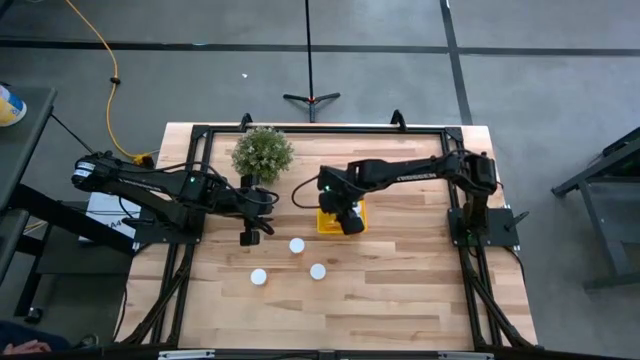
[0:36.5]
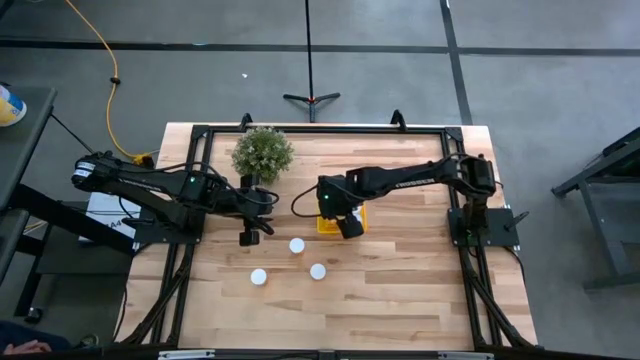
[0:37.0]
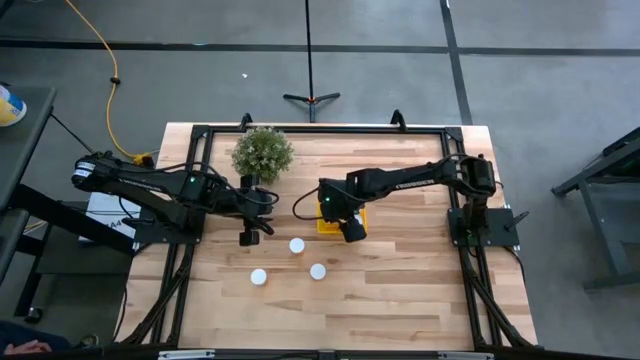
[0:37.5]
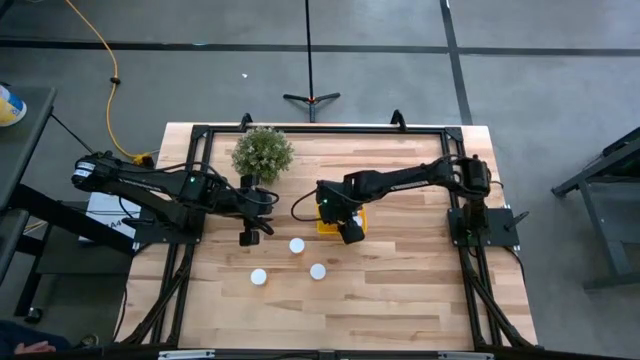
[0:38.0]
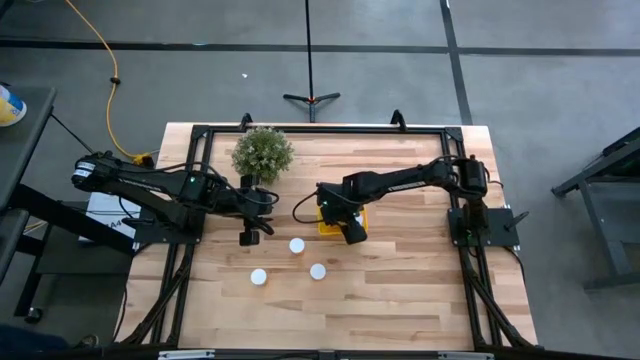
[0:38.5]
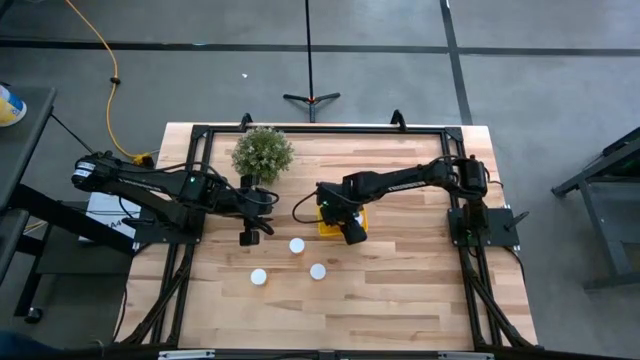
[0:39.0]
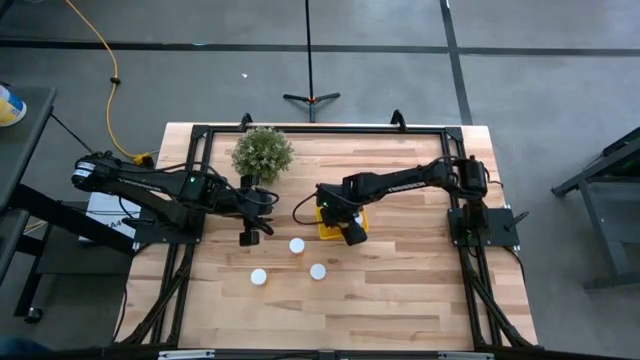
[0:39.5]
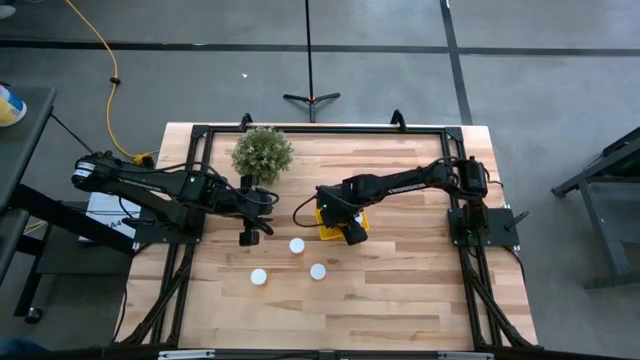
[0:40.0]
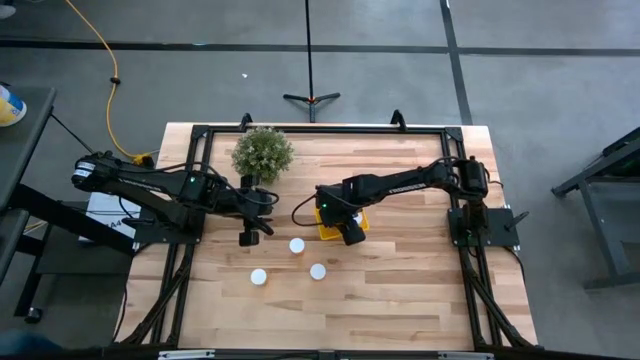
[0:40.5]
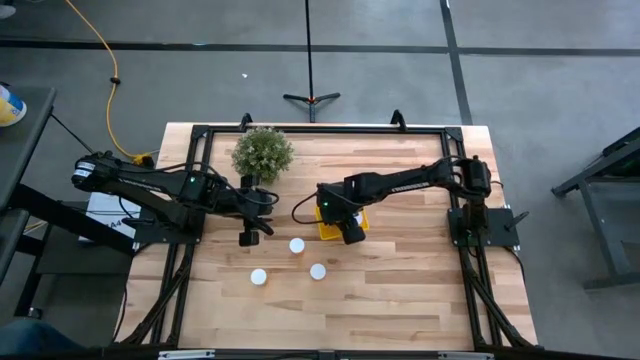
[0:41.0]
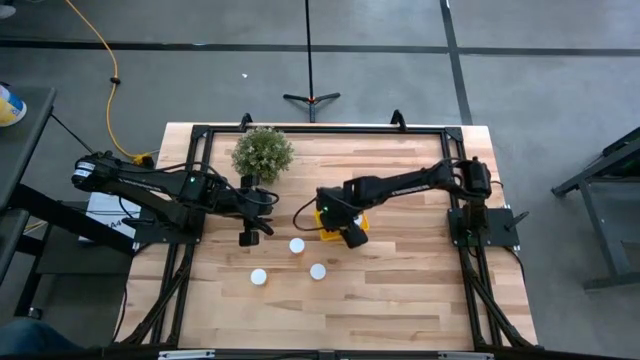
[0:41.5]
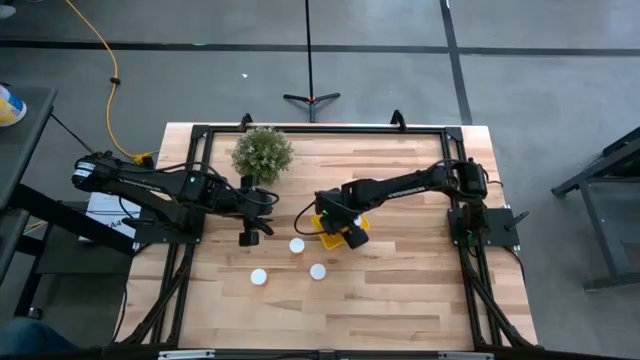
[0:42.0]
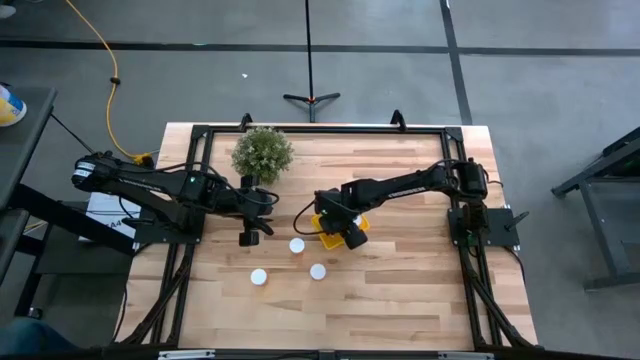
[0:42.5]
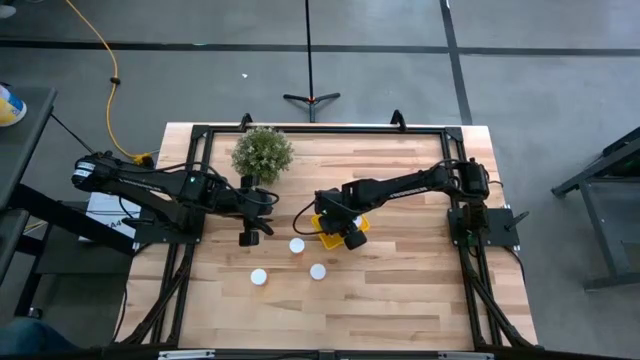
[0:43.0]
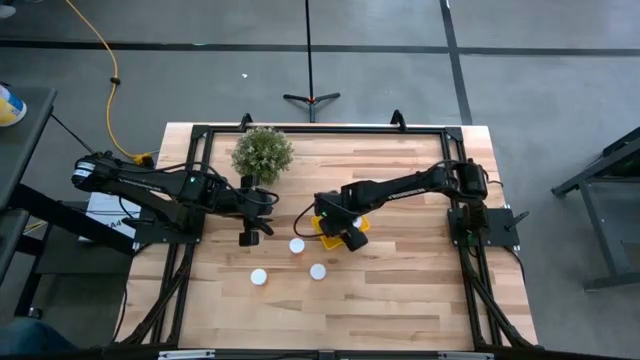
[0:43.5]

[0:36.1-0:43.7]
Task: Pick and place pill bottles into a basket
Adjust the orange pill bottles

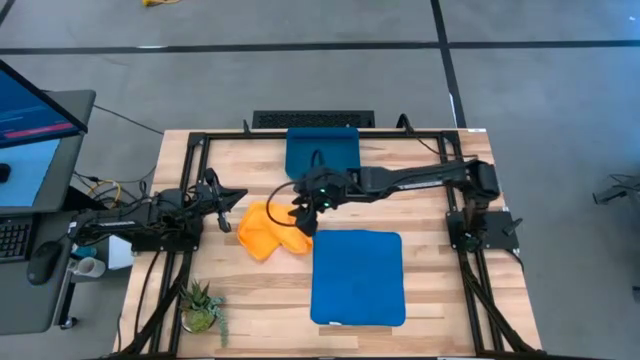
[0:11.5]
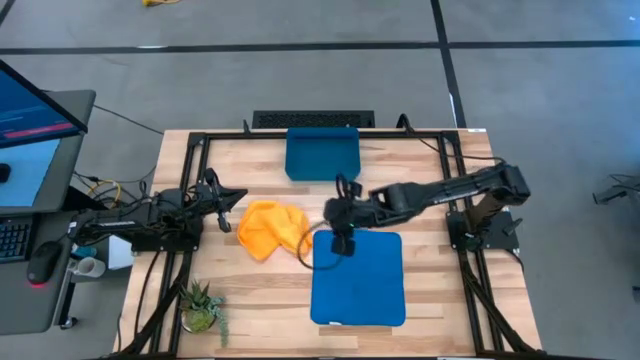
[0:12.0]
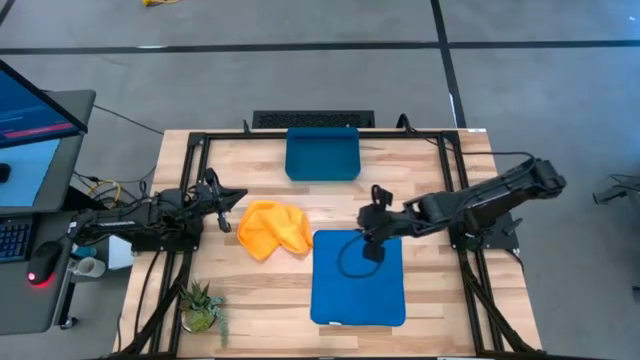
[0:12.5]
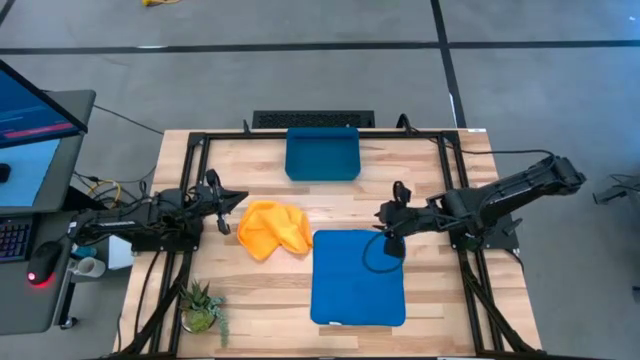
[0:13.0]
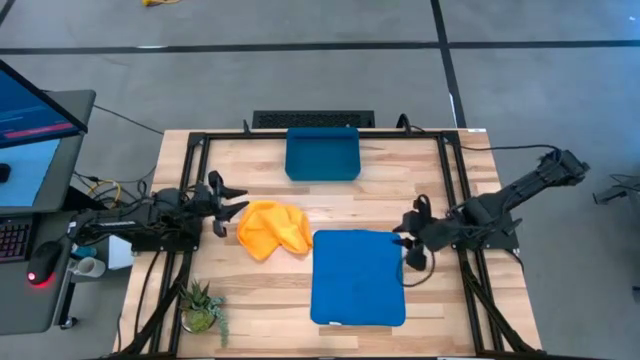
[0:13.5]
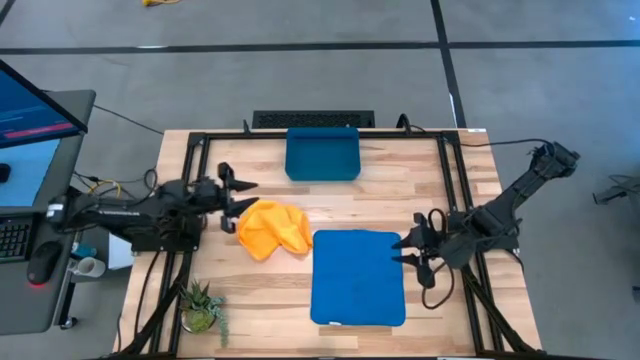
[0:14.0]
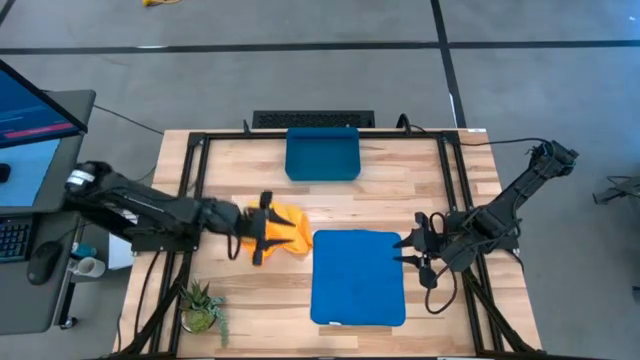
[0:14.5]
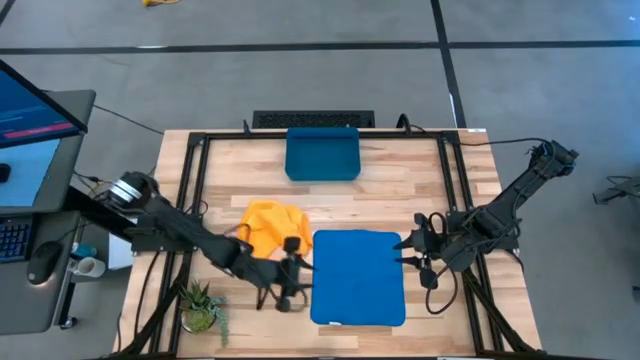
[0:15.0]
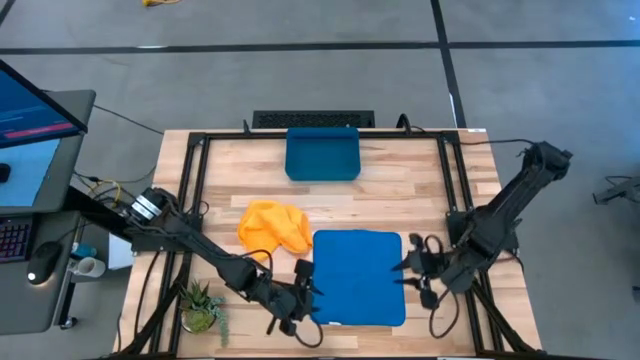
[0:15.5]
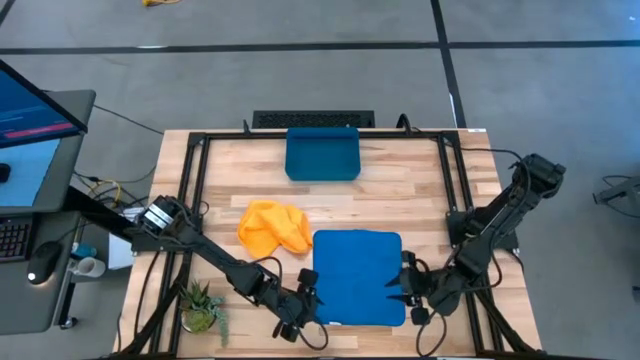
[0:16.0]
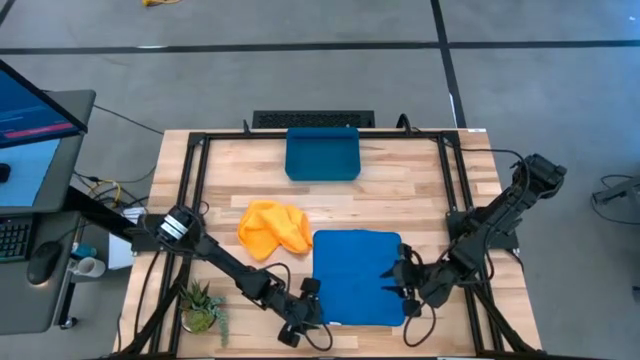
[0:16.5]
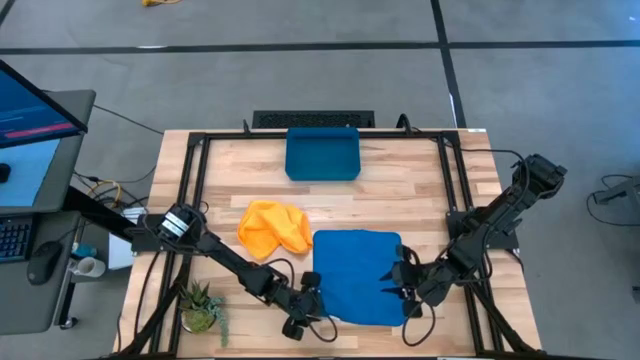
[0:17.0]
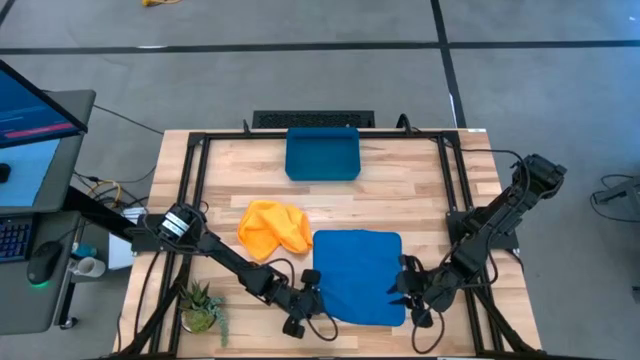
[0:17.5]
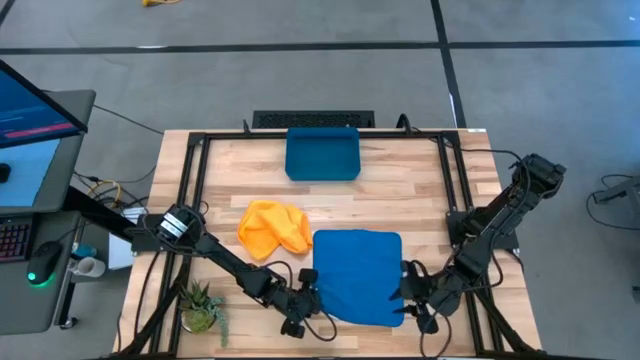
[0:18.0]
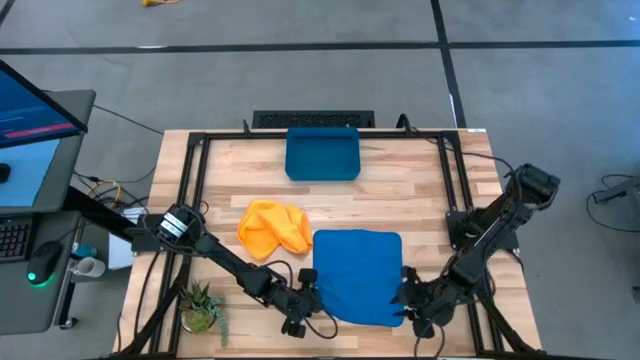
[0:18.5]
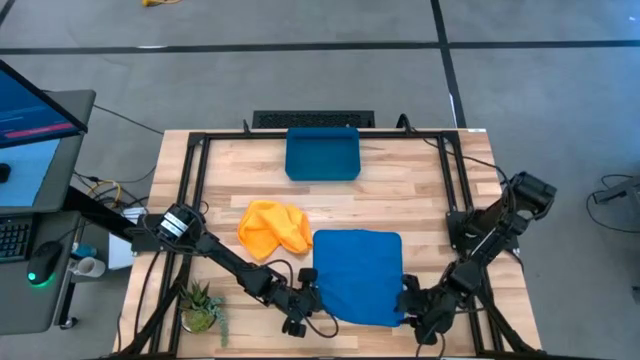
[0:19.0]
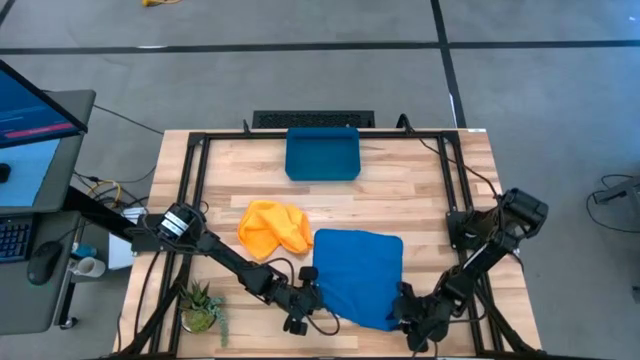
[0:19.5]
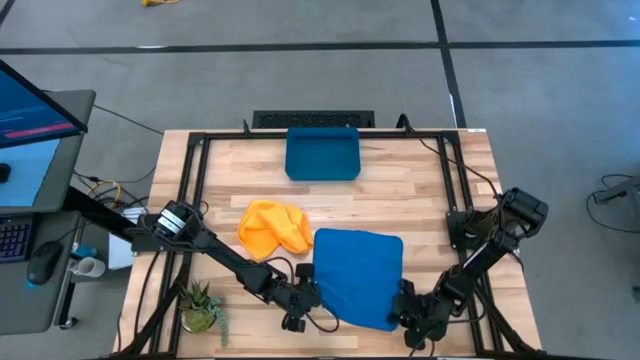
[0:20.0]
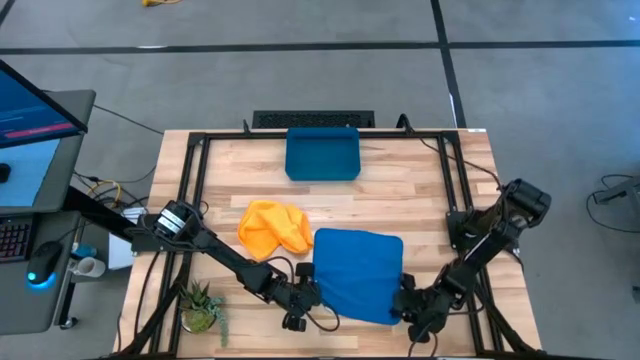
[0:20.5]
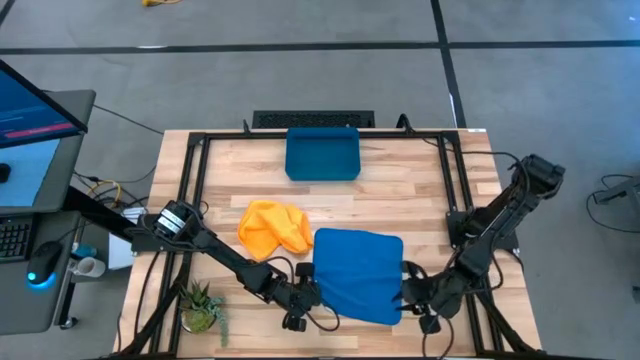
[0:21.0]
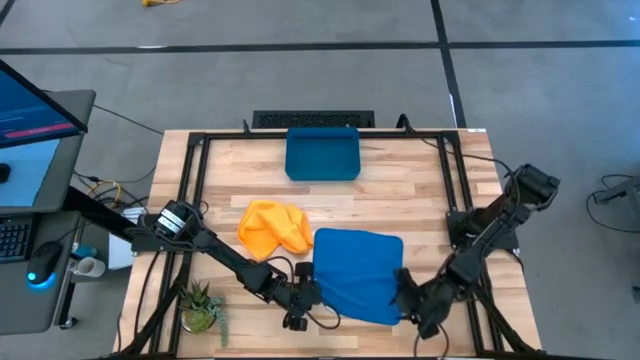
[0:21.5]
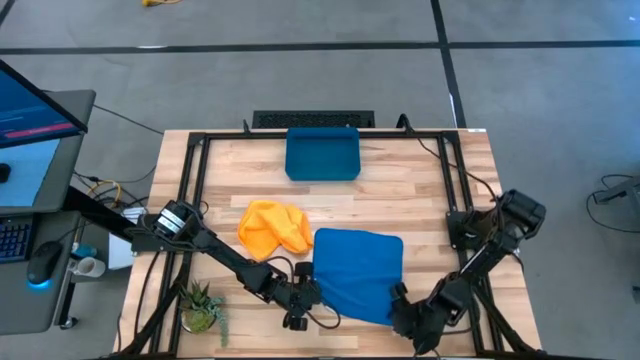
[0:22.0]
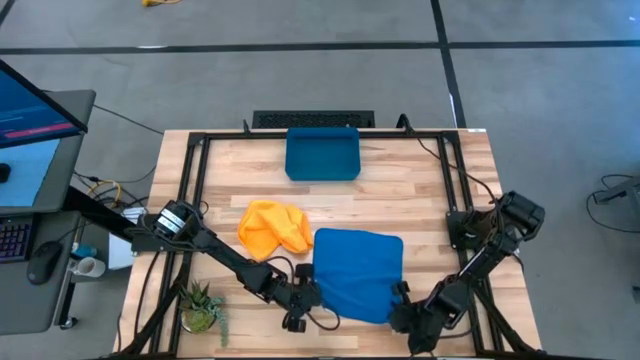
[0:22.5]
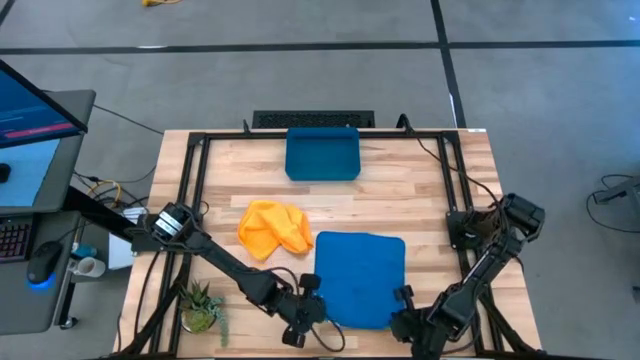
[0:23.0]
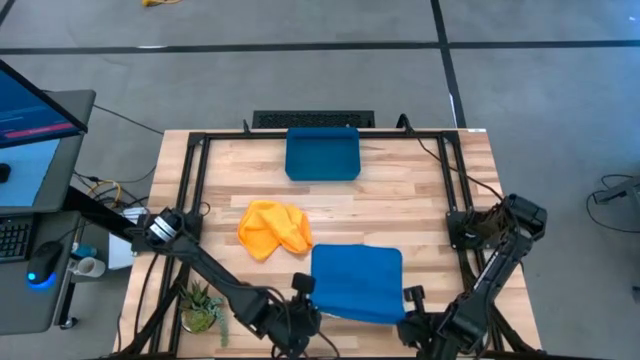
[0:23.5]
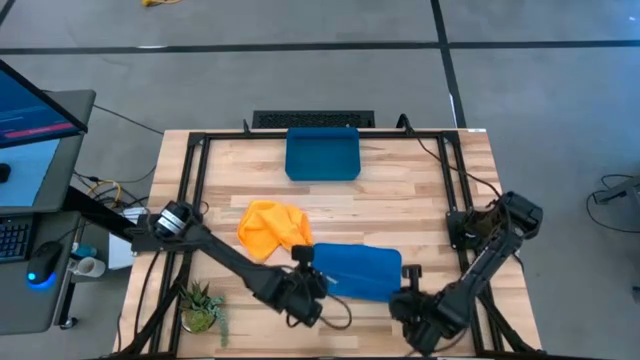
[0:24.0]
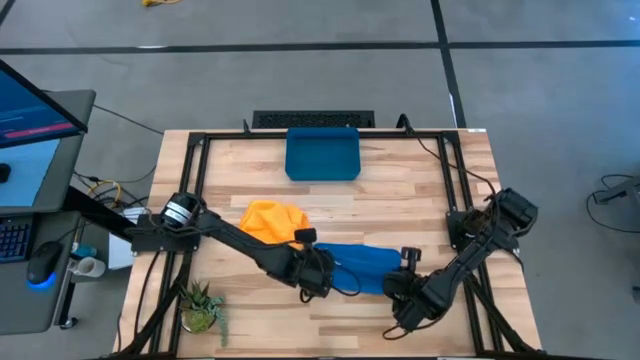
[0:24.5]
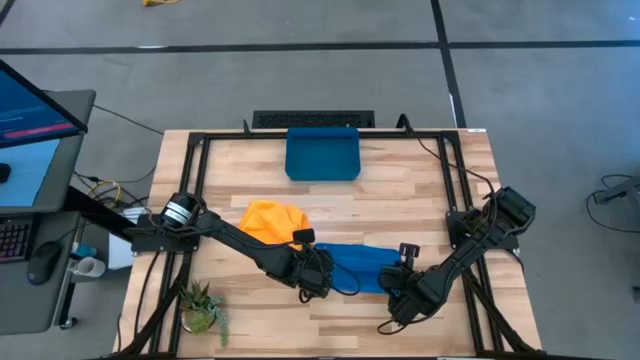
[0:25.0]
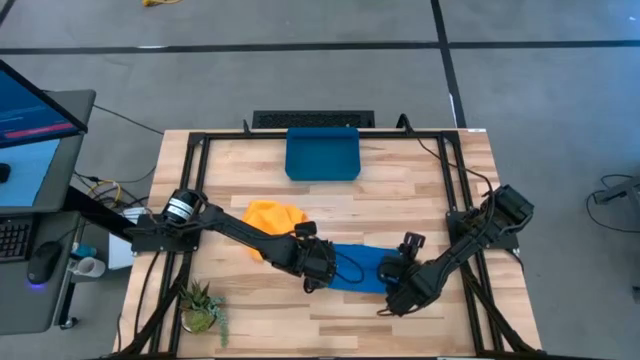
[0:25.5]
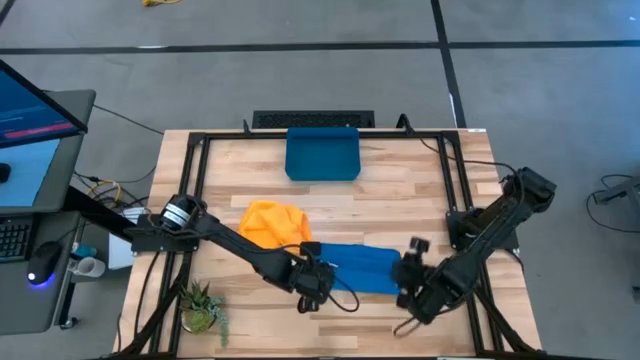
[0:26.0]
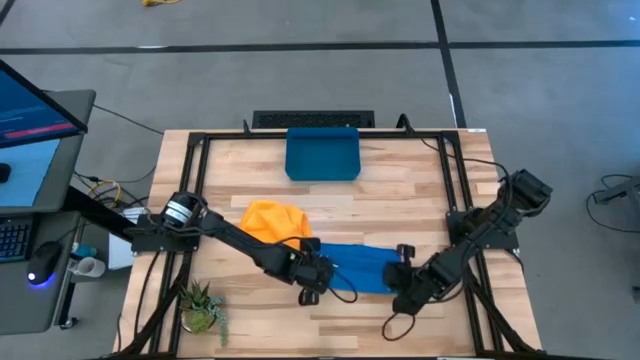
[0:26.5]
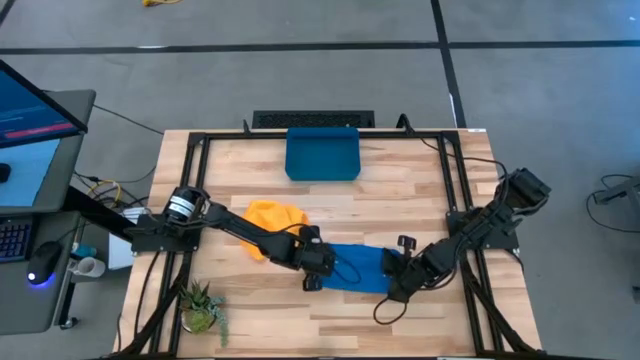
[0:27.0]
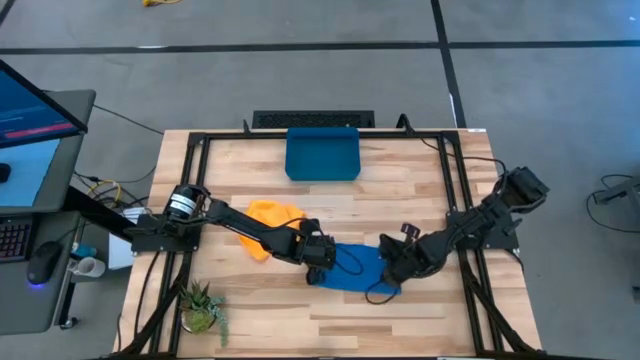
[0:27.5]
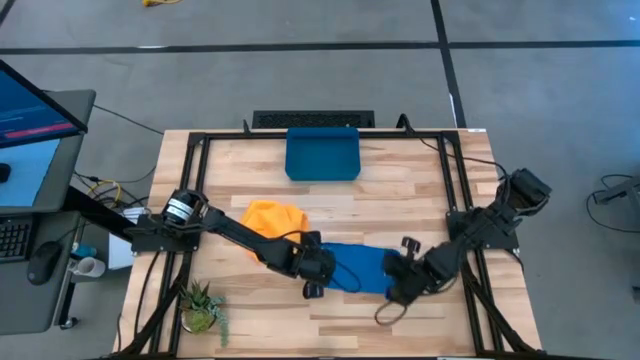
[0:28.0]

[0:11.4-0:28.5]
Task: Roll microfiber towels into tight, uniform cylinder then place into a basket
Fold the blue microfiber towel
